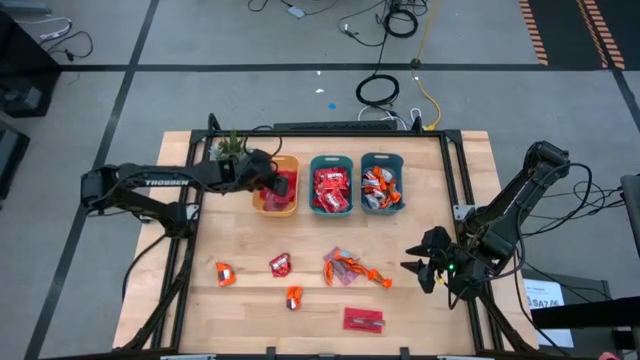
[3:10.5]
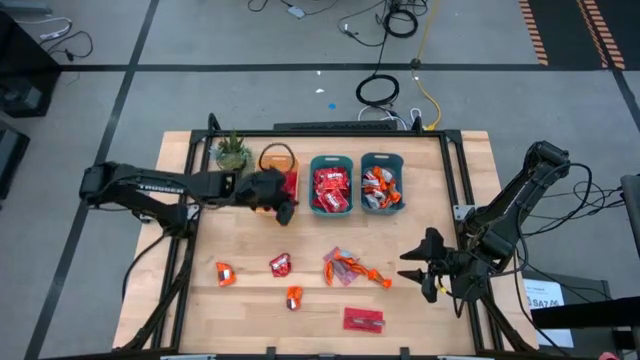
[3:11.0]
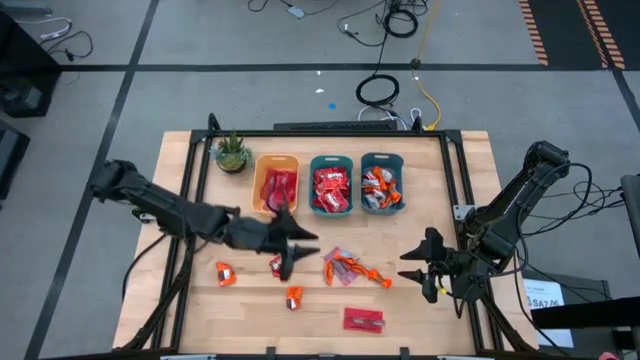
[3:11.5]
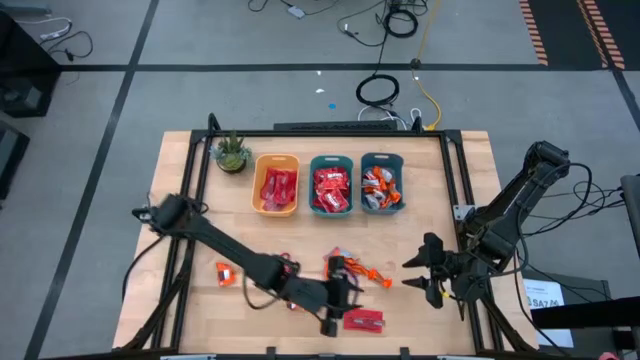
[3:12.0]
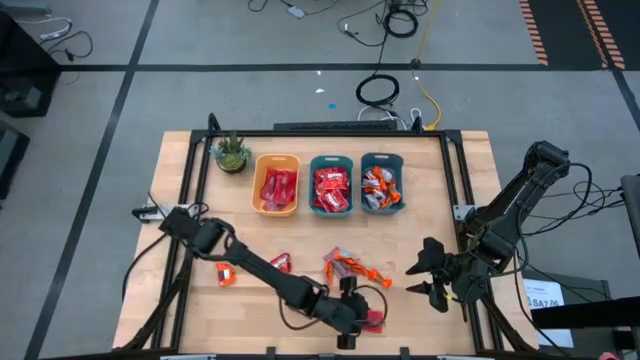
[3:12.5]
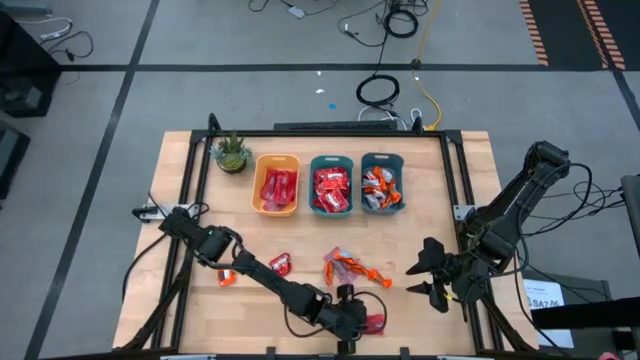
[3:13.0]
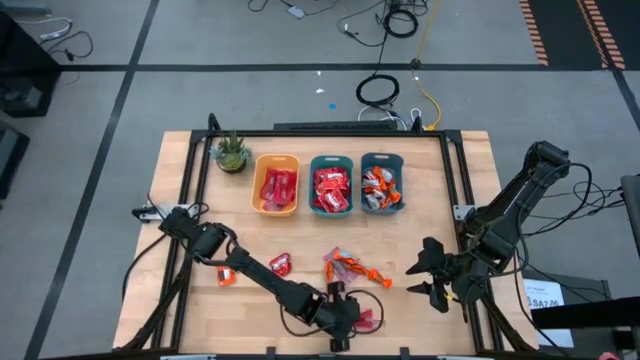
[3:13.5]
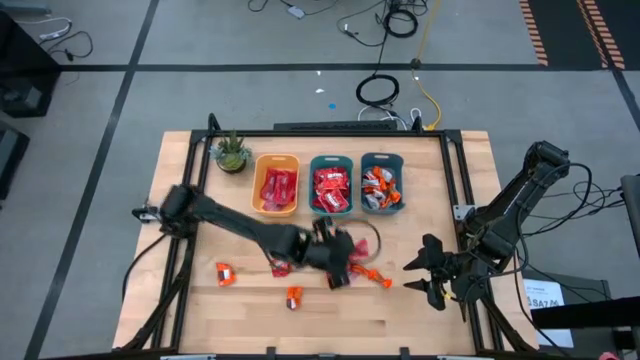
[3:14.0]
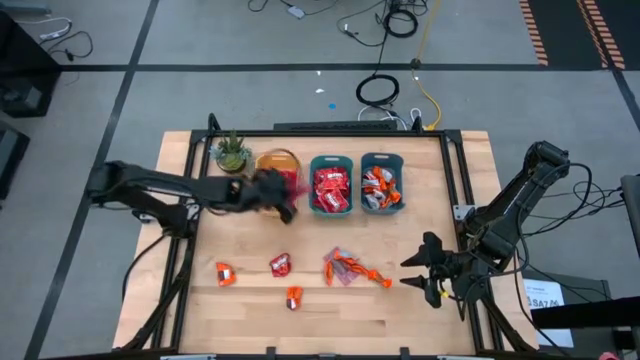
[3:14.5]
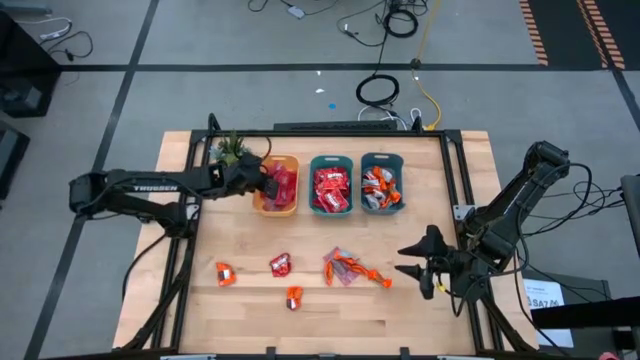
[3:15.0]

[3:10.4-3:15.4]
Task: Sort candy
Put the red candy into the top left yellow bin

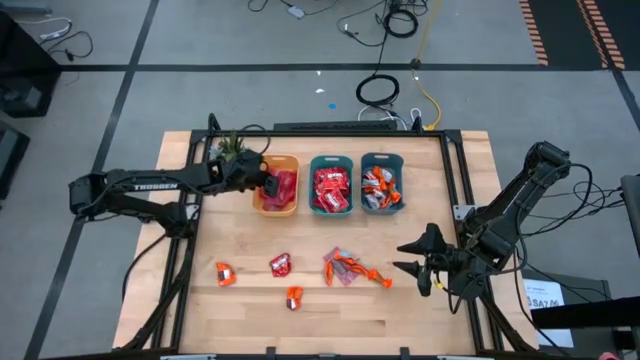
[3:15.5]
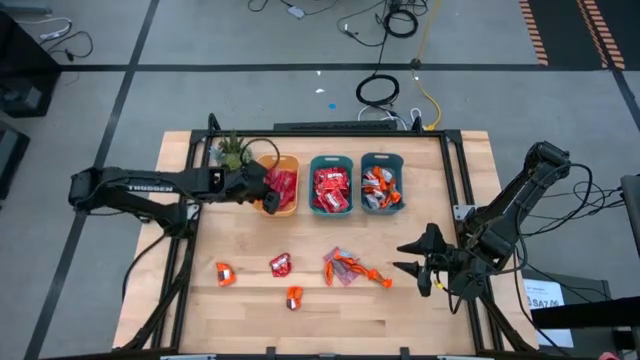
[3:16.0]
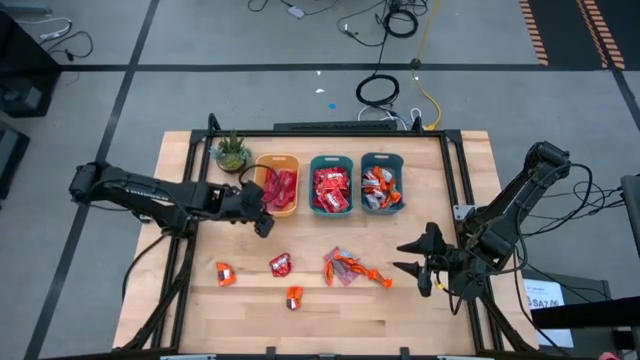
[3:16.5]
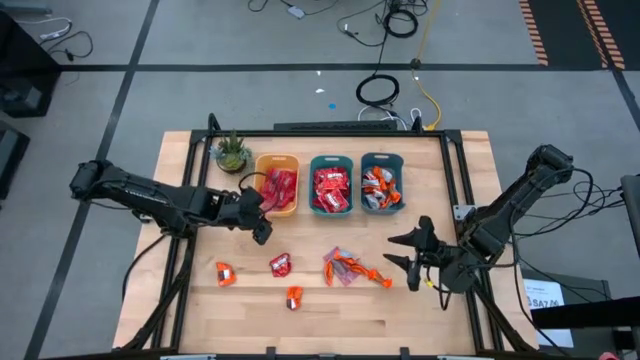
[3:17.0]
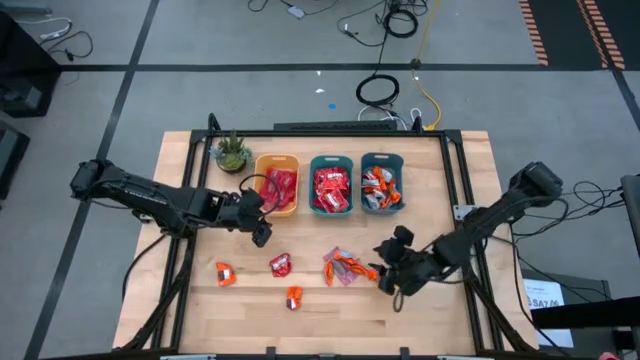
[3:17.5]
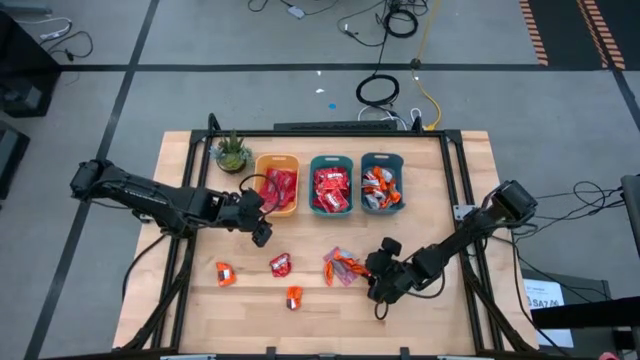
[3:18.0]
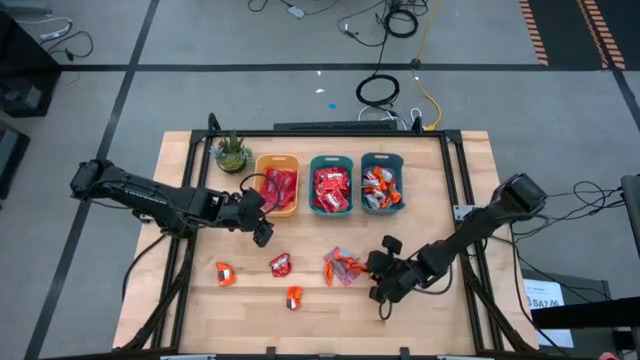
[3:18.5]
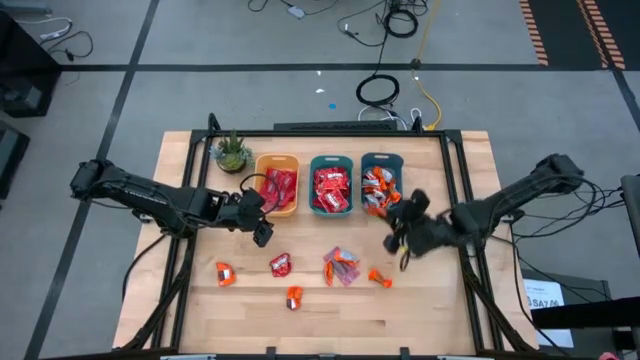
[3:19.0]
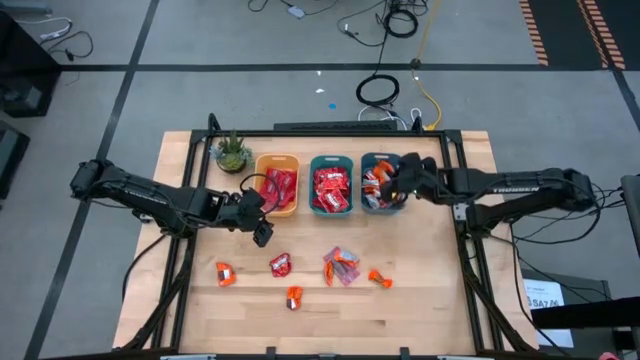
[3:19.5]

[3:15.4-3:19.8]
Put the orange candy into the top right blue bin

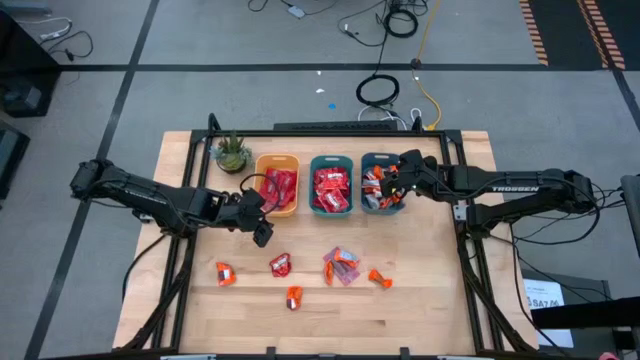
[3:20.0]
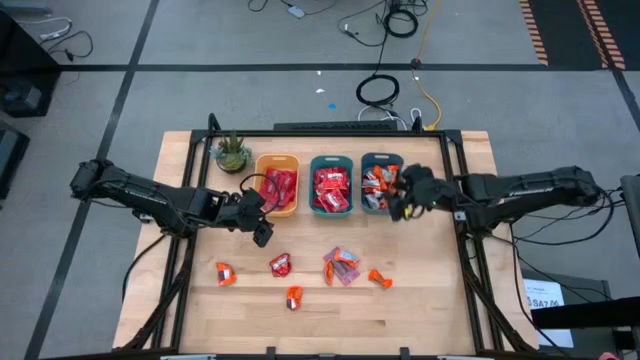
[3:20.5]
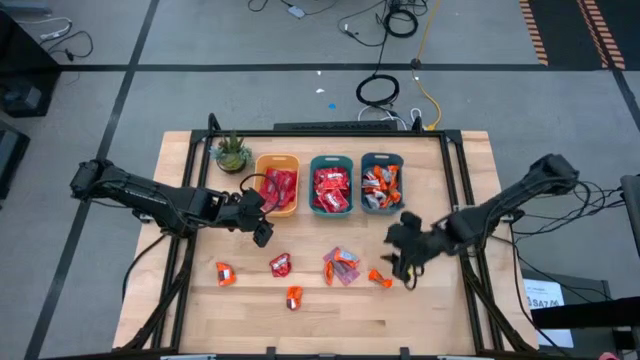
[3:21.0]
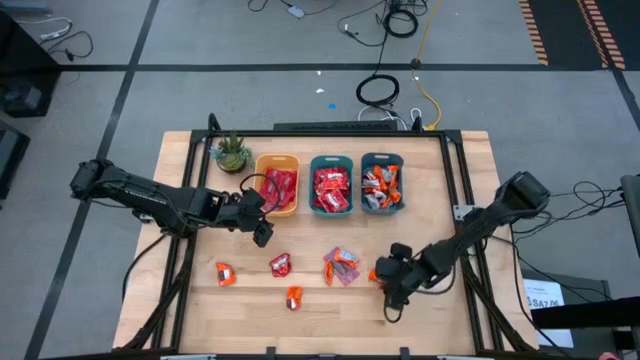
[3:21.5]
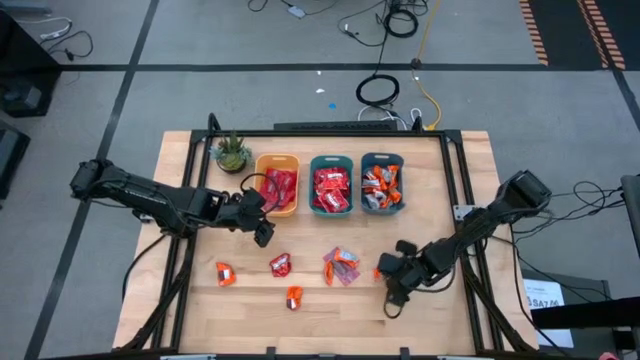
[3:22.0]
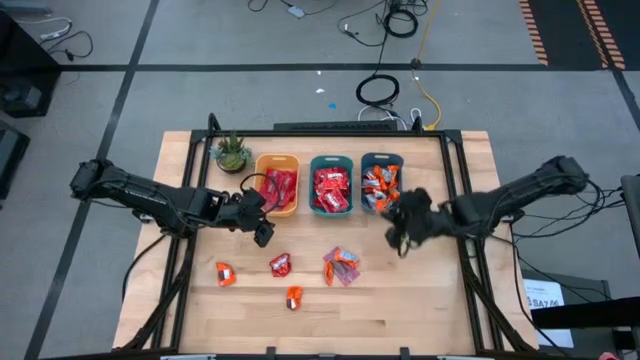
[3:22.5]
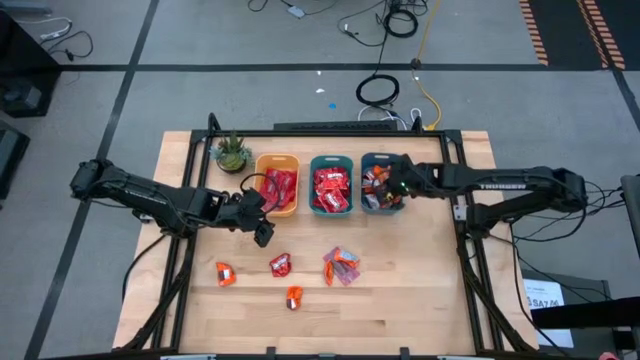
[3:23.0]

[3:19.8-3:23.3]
Put the orange candy into the top right blue bin

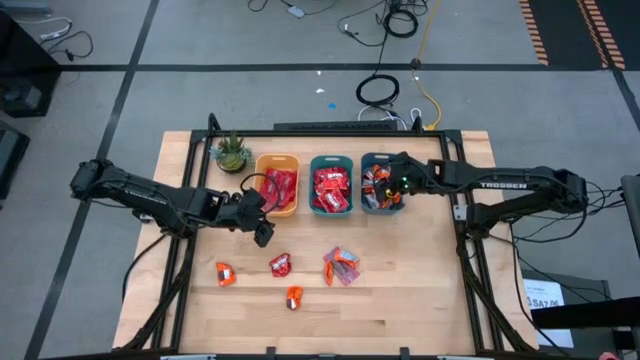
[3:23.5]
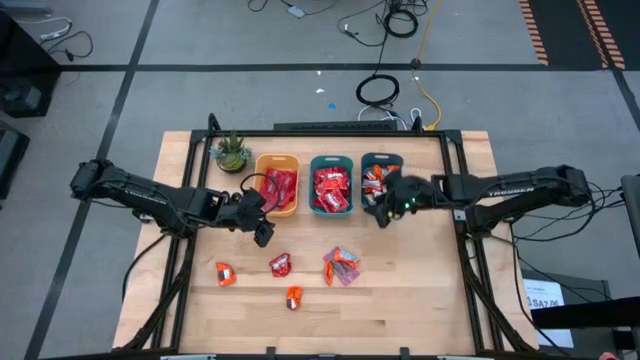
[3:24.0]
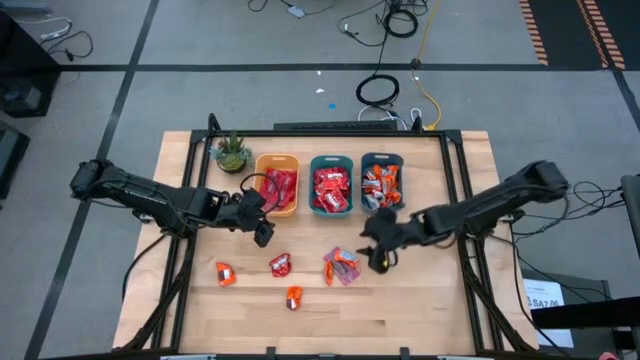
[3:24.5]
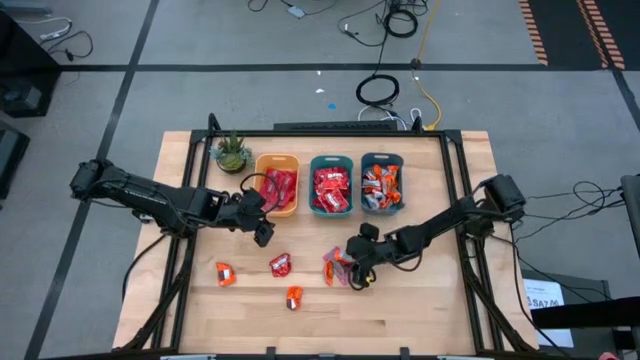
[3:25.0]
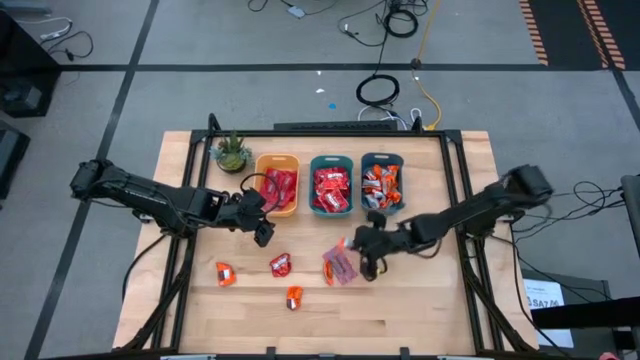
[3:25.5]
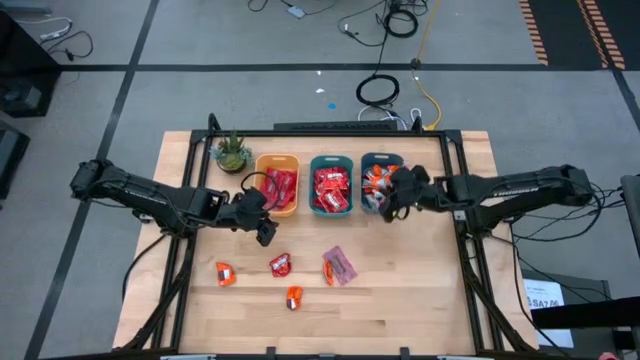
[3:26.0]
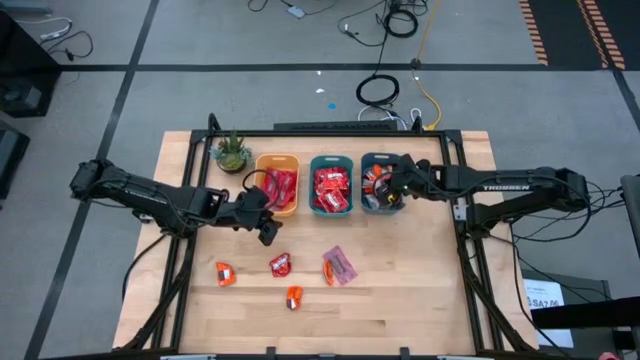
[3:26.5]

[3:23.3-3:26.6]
Put the orange candy into the top right blue bin

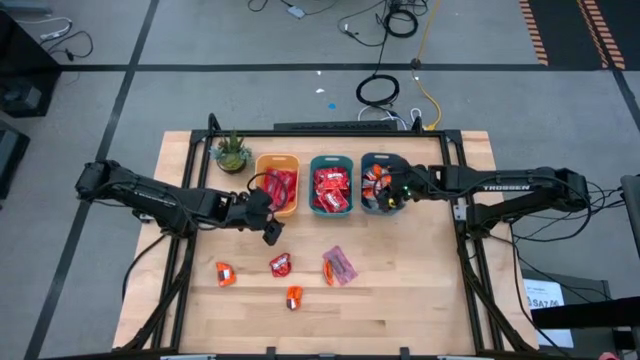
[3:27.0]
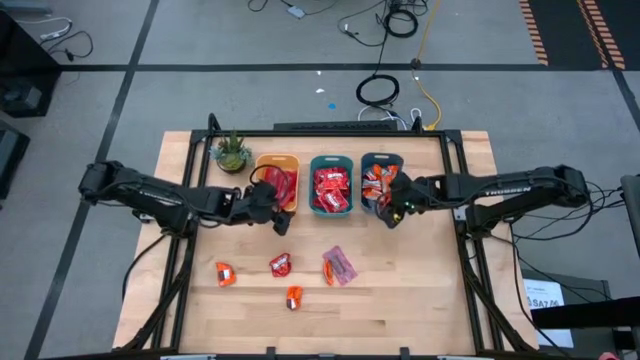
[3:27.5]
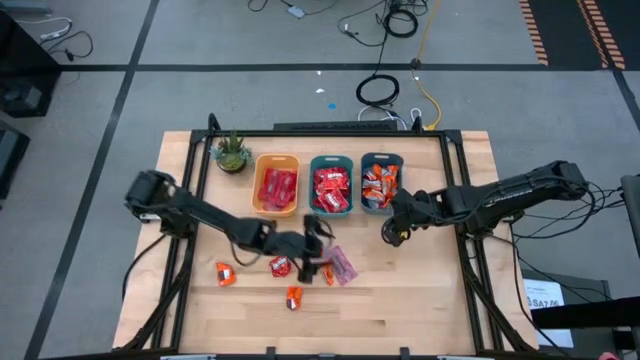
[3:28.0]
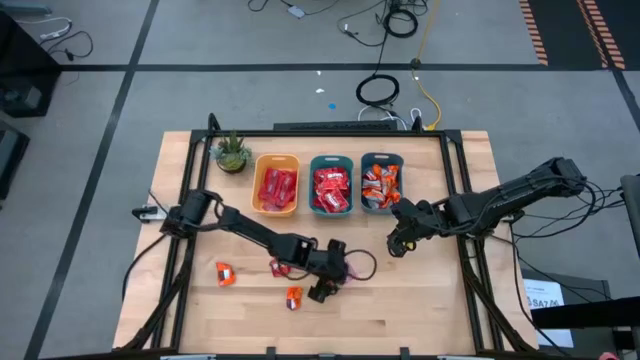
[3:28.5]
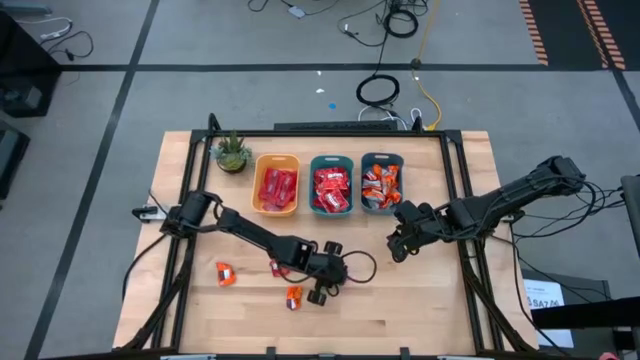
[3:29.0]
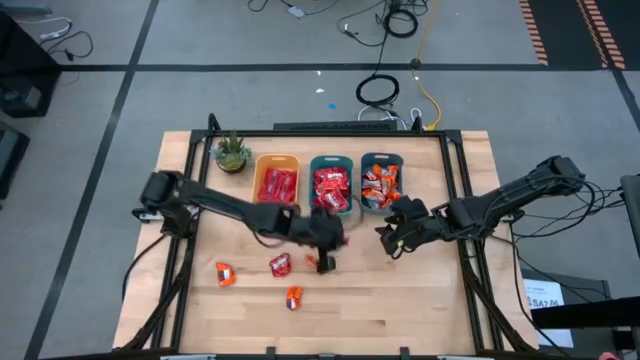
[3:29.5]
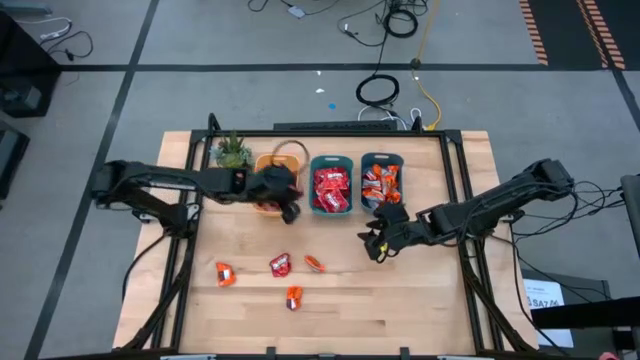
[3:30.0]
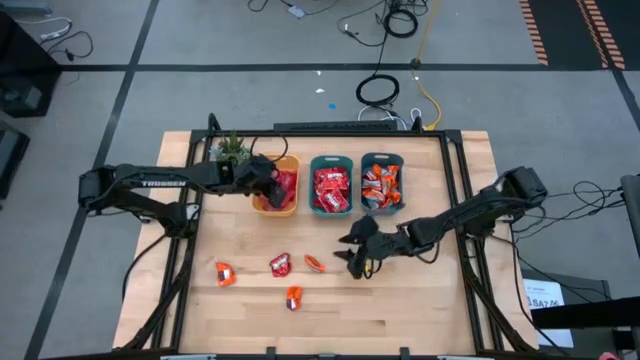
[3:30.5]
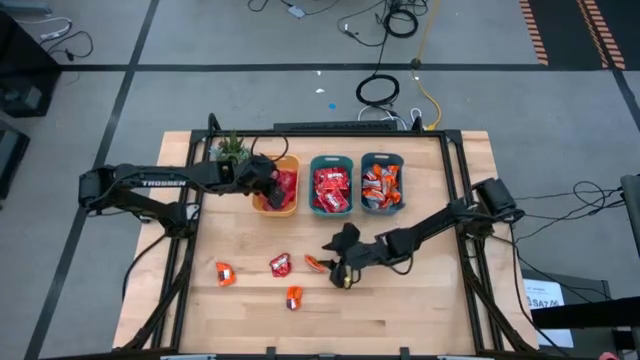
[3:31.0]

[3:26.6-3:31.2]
Put the red candy into the top left yellow bin

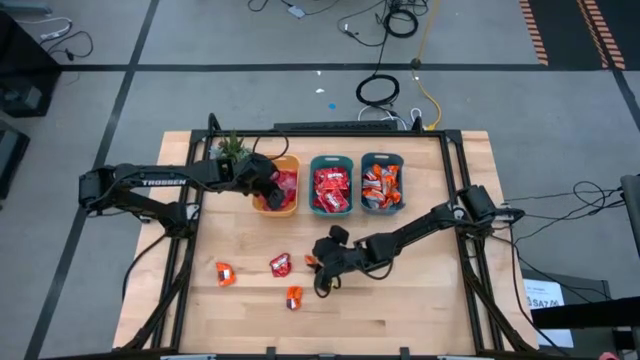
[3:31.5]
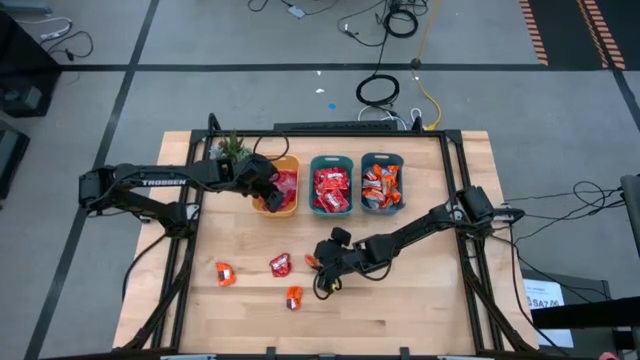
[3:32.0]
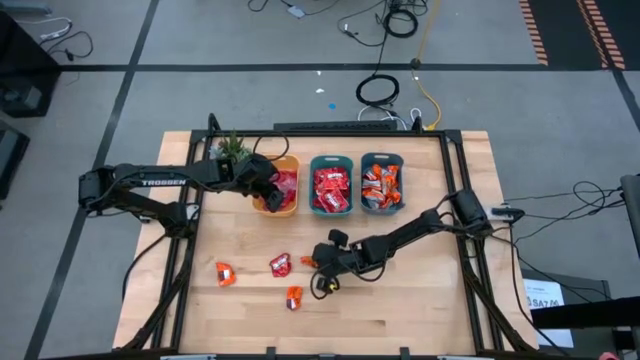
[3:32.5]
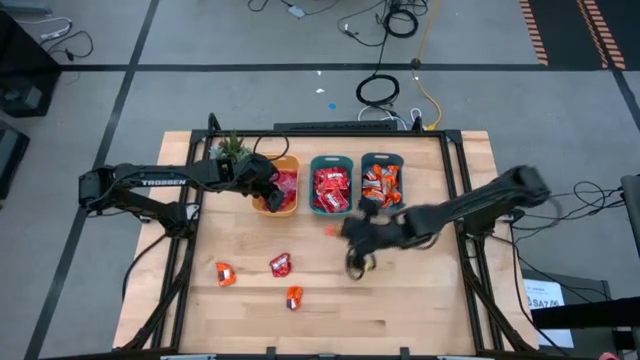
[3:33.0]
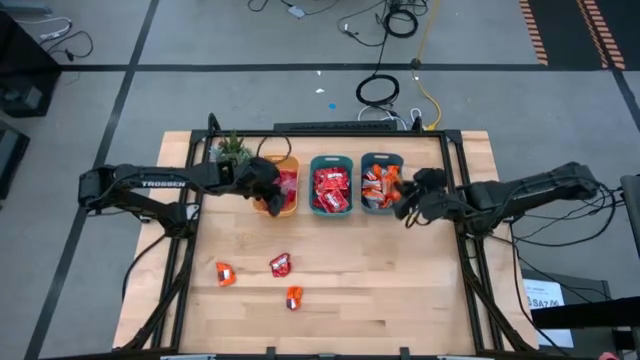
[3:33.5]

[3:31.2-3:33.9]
Put the orange candy into the top right blue bin
